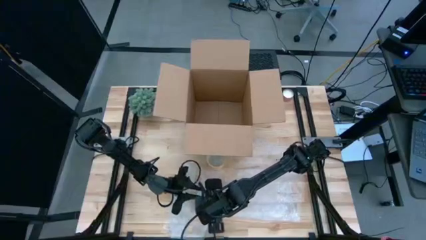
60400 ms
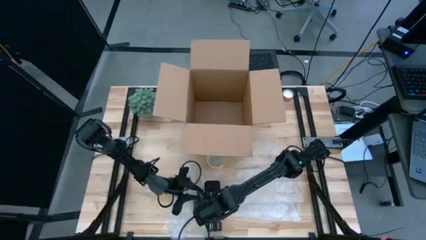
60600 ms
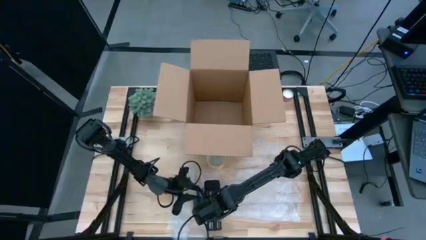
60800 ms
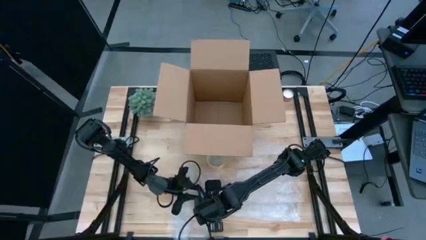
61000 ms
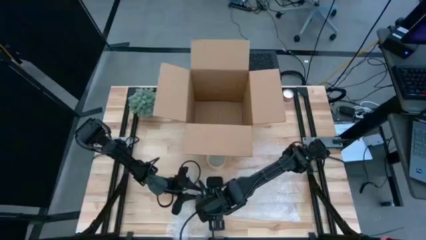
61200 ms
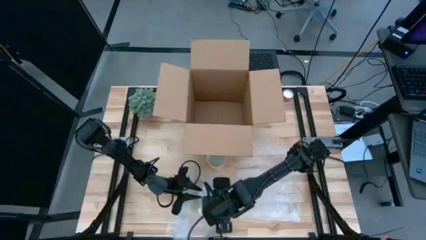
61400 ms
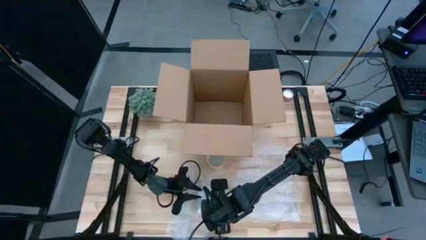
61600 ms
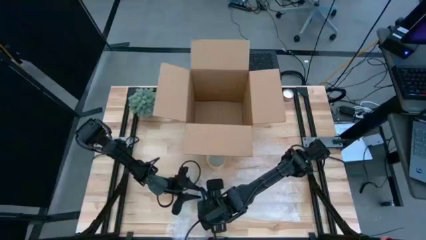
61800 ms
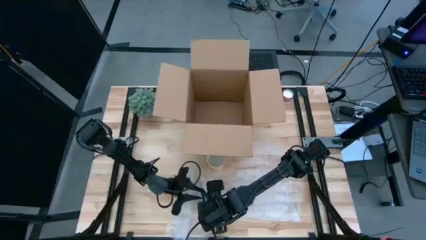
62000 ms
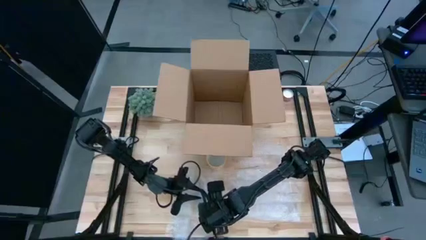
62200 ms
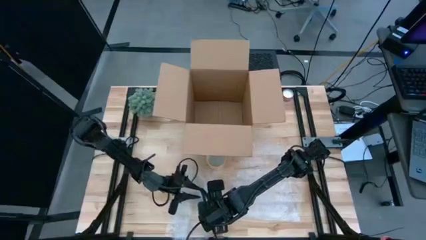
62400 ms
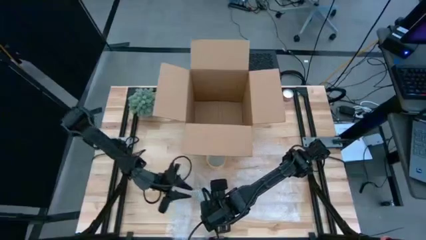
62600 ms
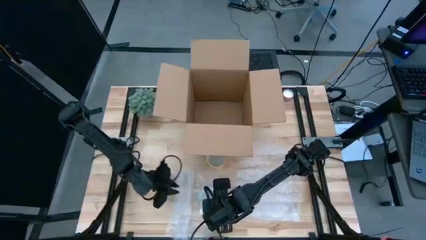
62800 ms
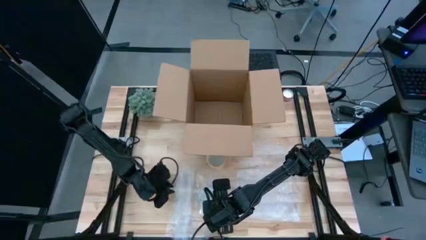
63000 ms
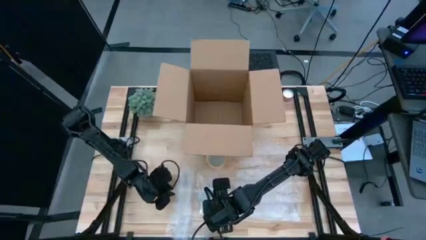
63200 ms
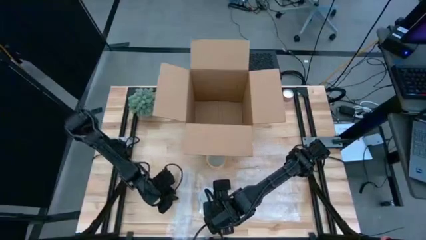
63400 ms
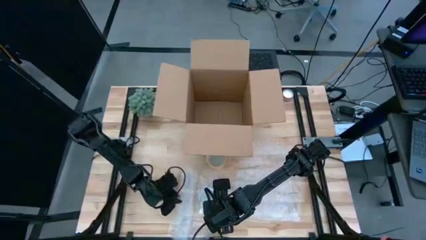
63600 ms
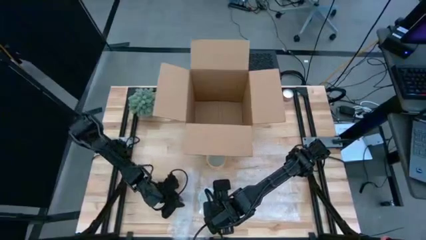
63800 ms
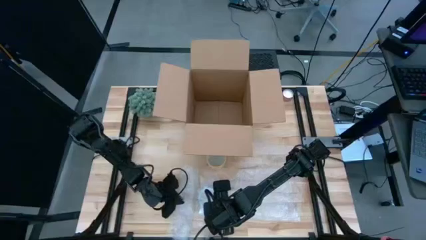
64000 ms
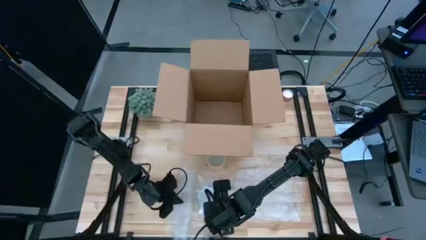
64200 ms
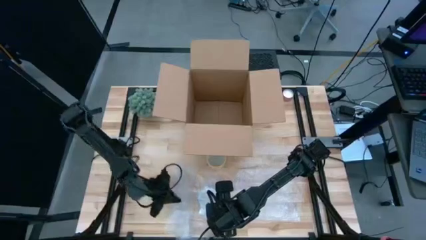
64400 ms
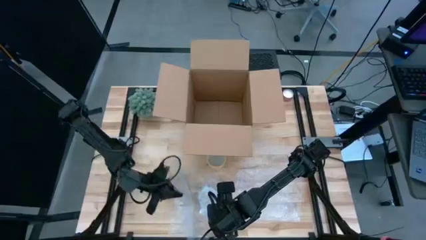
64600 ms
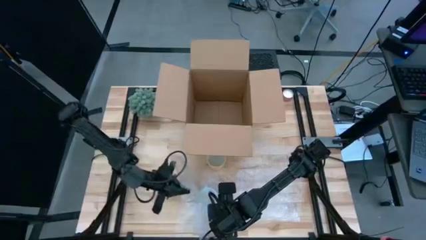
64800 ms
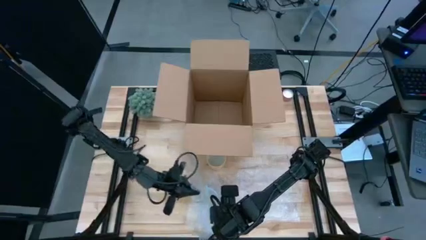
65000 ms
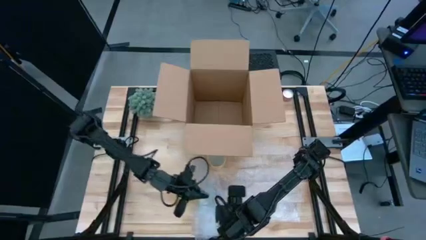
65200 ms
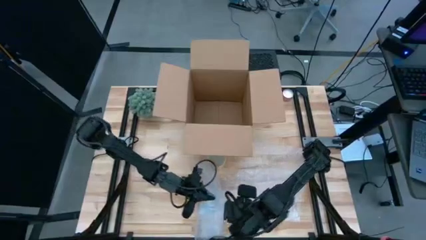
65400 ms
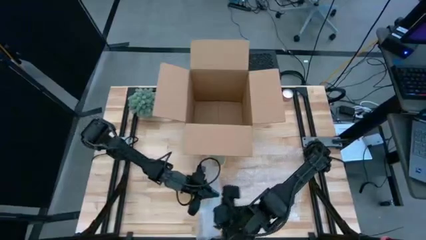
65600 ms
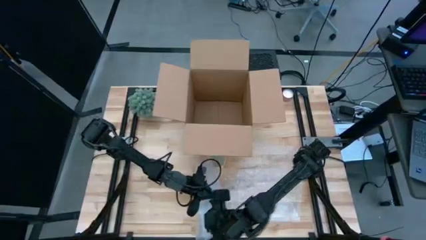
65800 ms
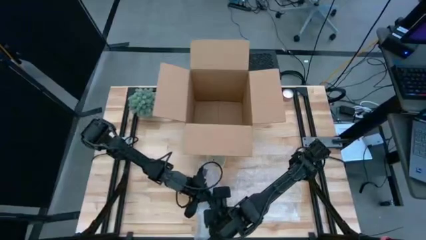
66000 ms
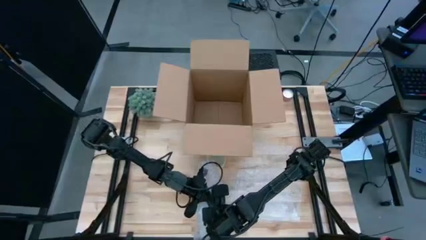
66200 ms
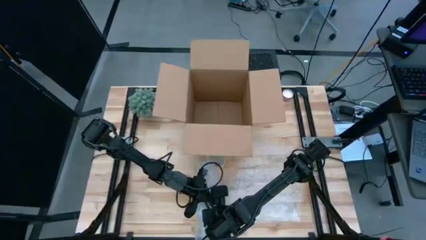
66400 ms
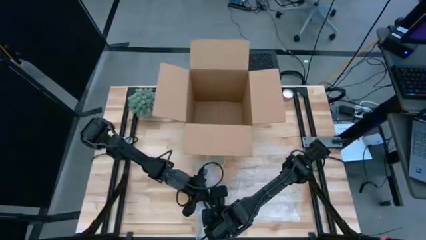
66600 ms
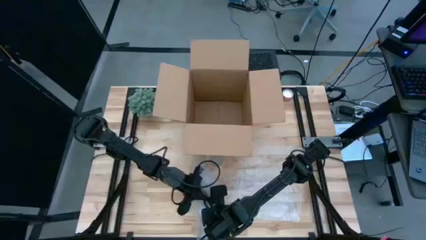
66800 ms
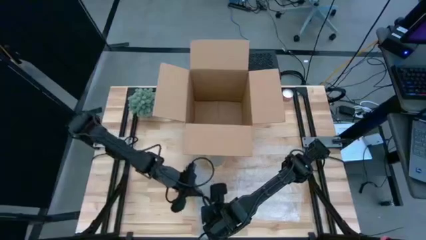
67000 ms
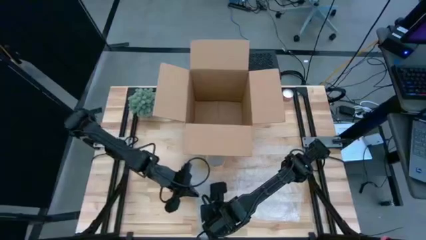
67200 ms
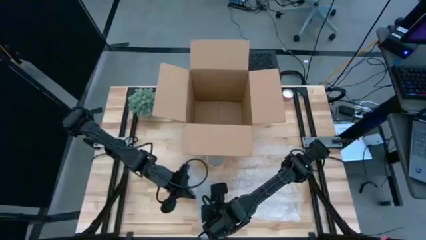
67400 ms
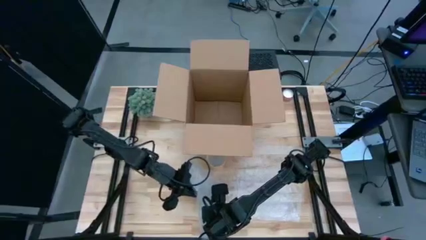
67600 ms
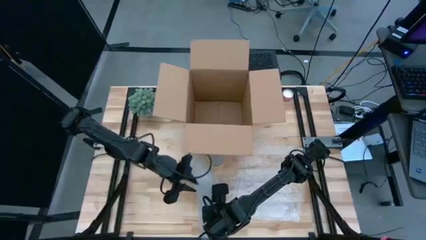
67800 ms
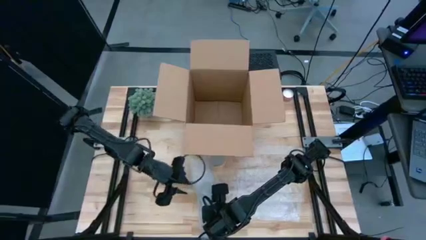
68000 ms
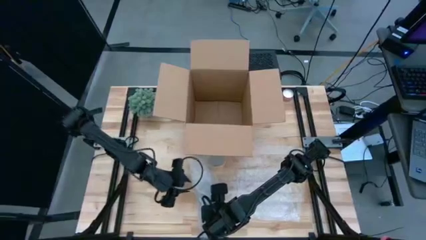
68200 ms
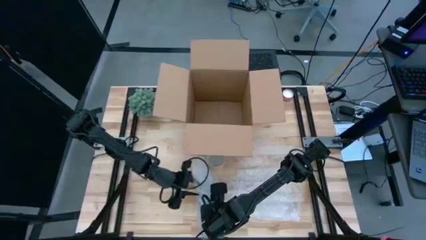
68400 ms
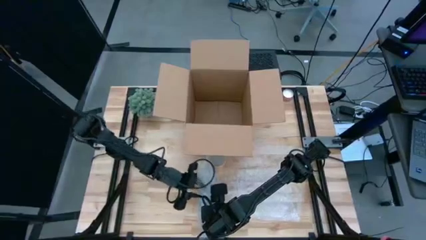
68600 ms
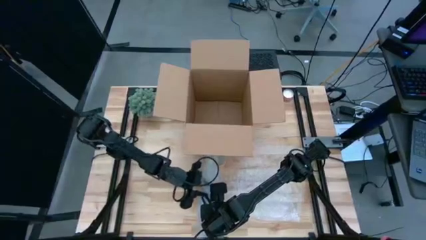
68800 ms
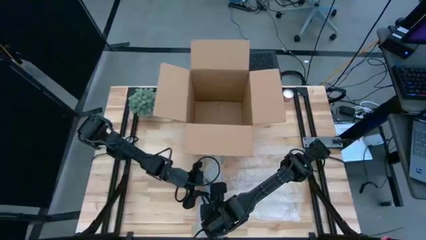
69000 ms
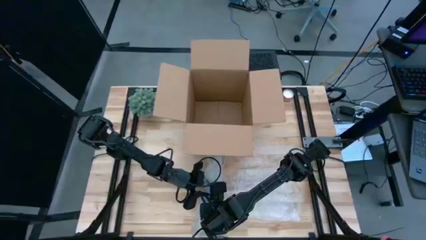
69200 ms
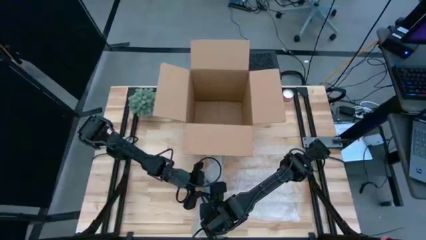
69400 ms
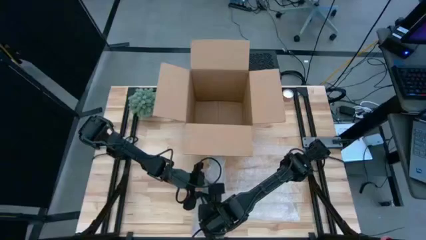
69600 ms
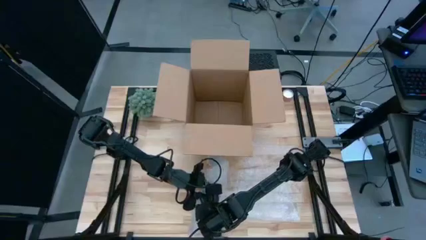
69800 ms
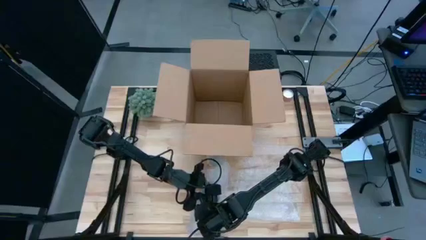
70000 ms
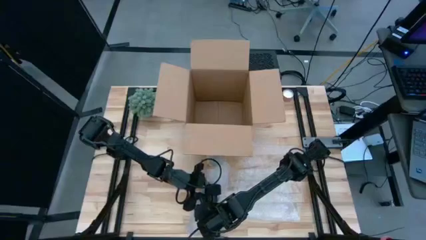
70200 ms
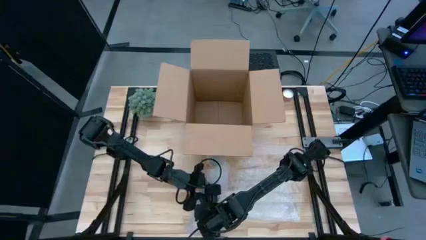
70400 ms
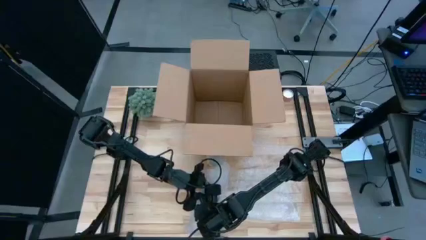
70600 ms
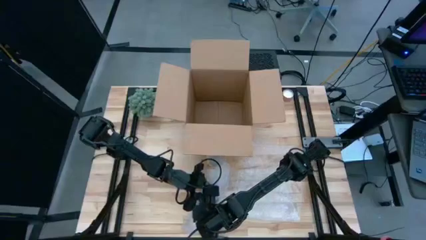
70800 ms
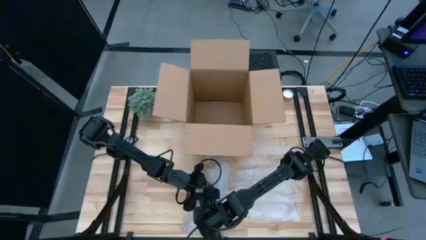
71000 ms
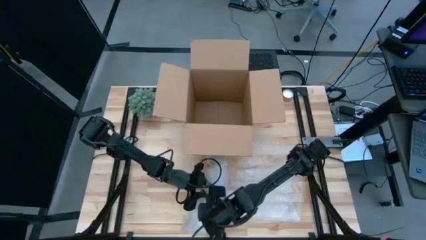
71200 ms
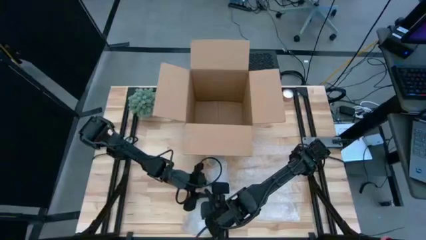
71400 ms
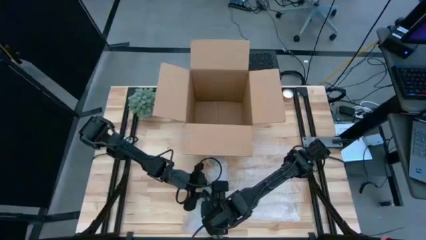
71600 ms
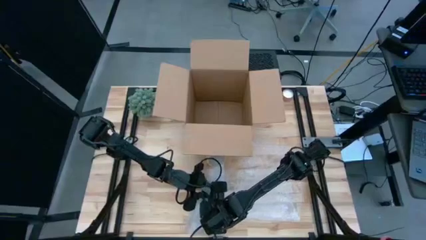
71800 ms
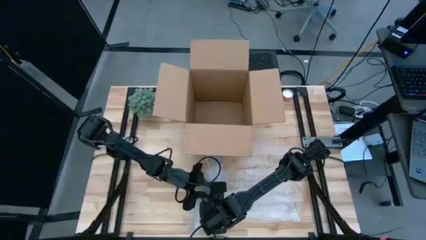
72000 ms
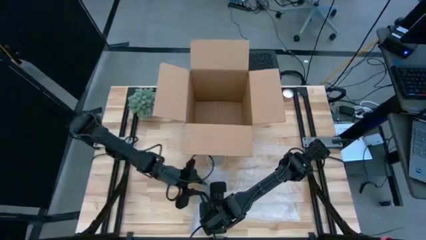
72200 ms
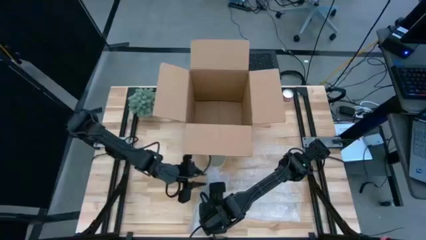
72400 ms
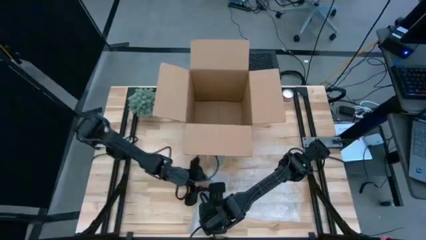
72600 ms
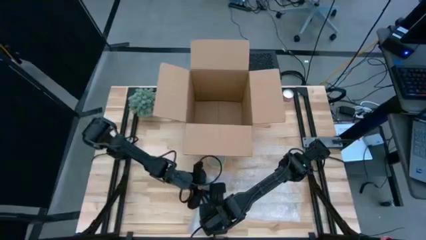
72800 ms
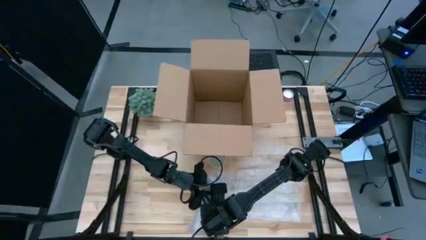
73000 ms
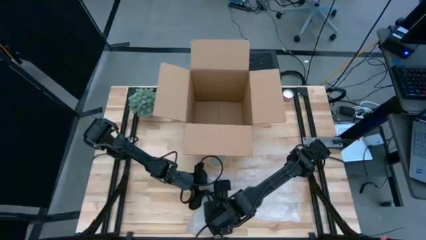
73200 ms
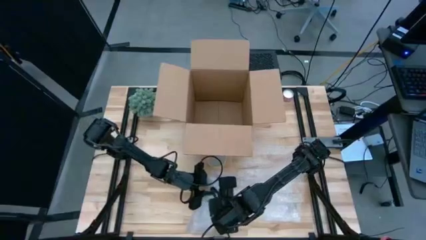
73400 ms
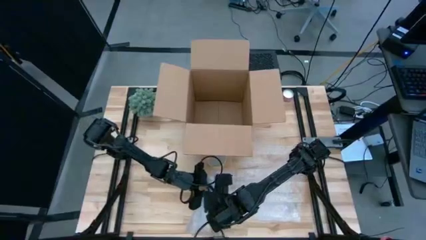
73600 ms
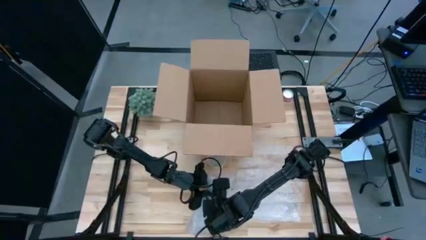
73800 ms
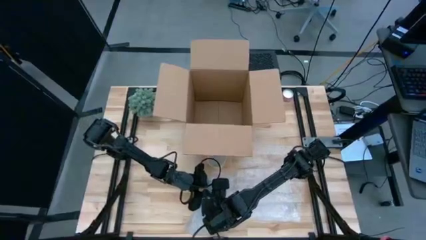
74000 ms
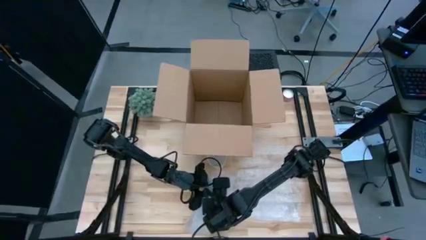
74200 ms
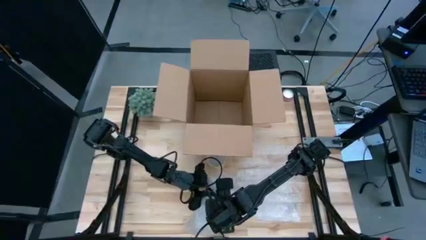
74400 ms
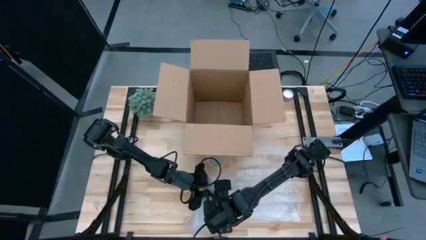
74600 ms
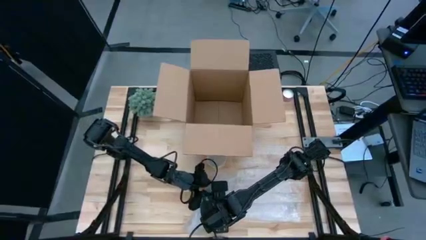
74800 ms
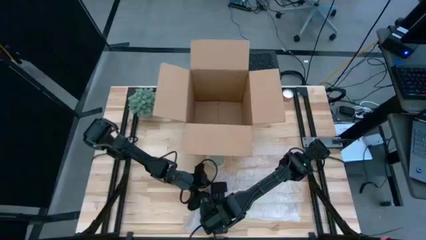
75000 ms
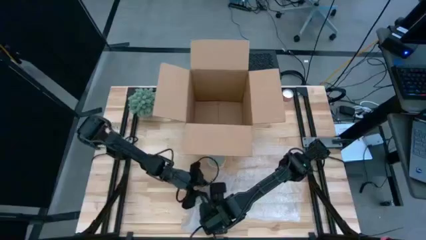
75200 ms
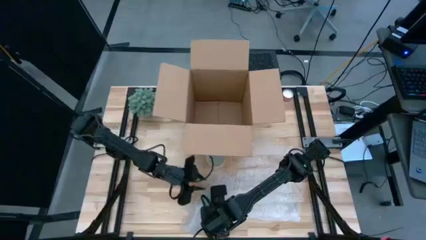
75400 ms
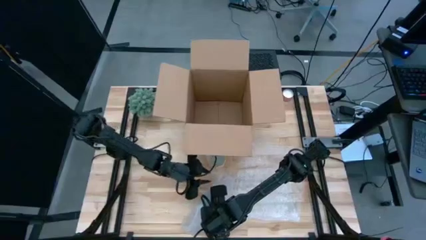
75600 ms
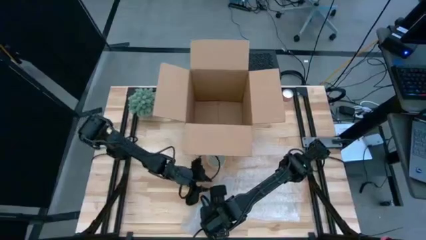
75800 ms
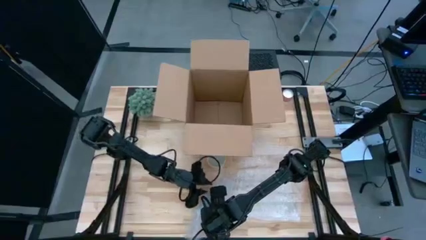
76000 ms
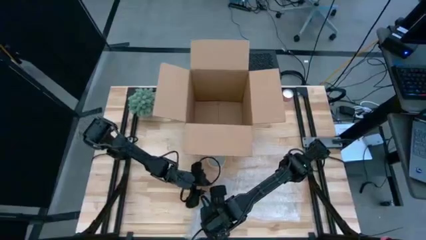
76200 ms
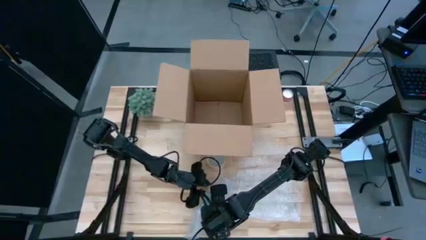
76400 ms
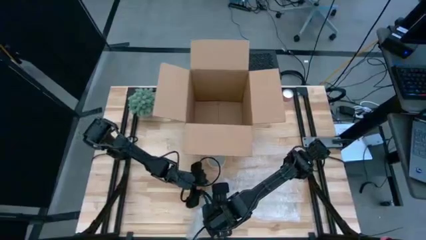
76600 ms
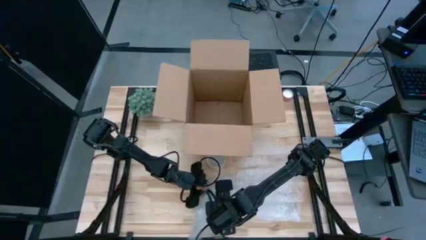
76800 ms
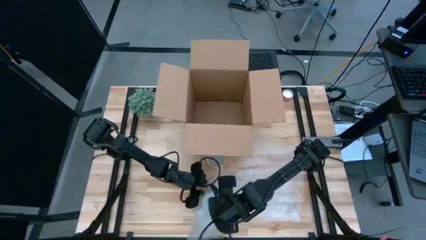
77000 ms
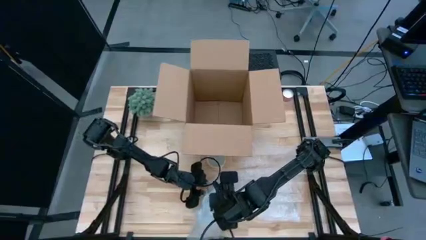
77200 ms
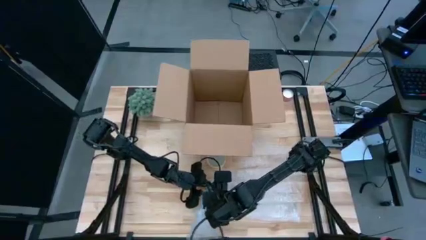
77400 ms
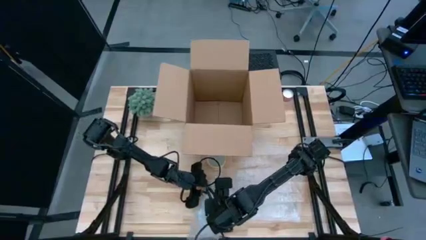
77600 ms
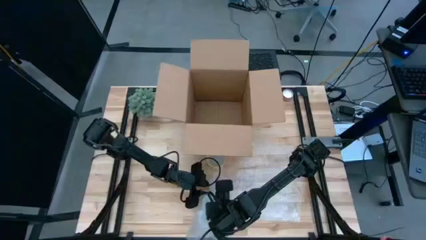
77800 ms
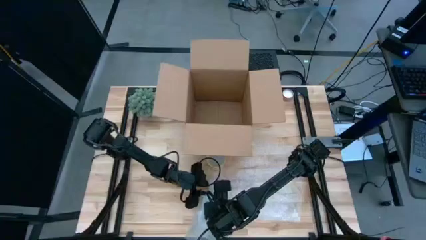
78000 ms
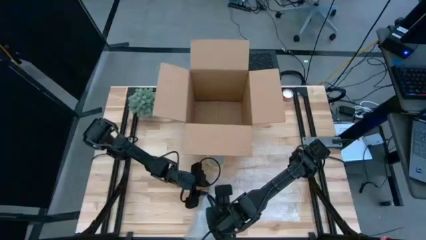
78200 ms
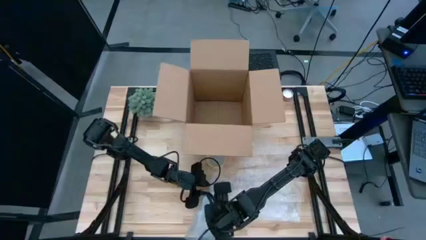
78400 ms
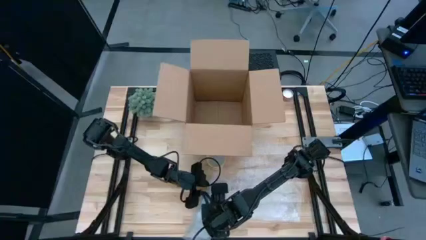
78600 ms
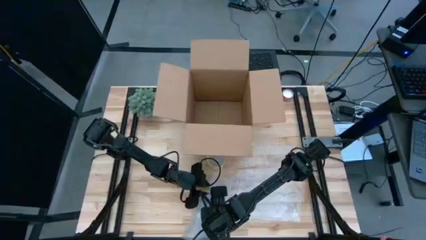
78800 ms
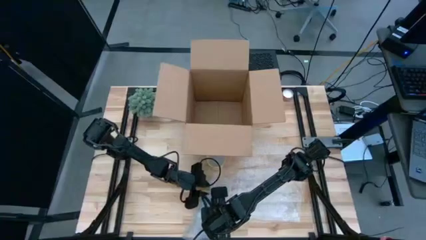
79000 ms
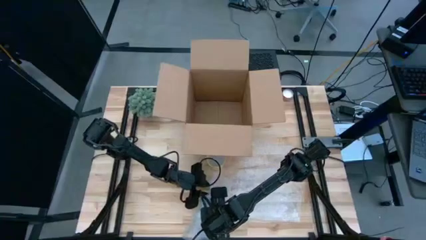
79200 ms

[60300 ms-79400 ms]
Task: wrap mug
Wrap the red patterned mug with bubble wrap
